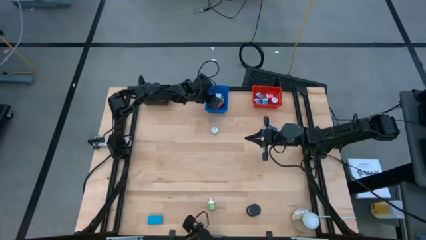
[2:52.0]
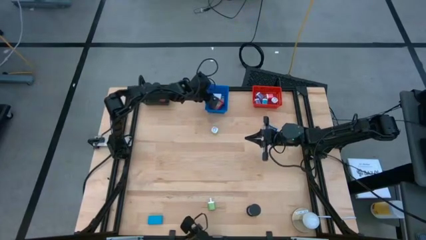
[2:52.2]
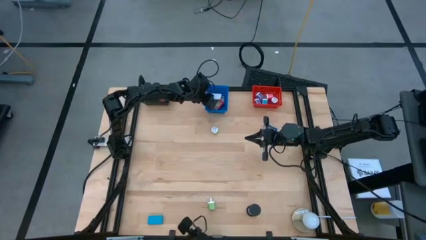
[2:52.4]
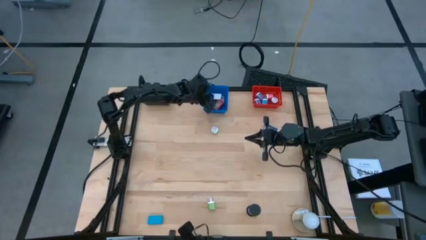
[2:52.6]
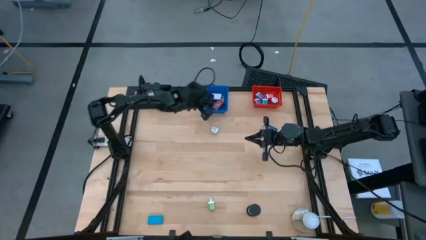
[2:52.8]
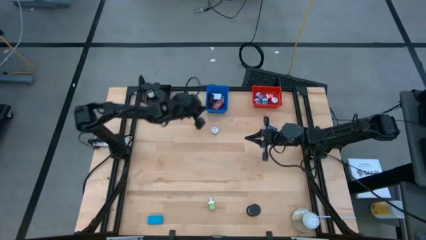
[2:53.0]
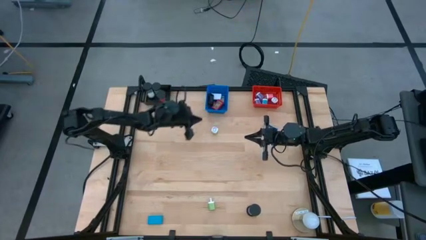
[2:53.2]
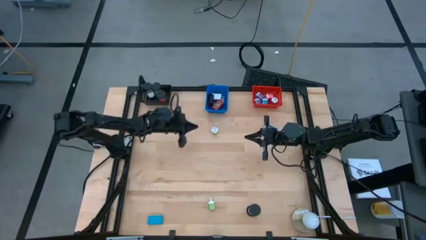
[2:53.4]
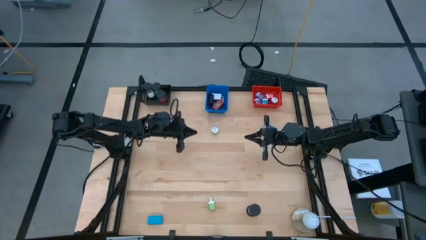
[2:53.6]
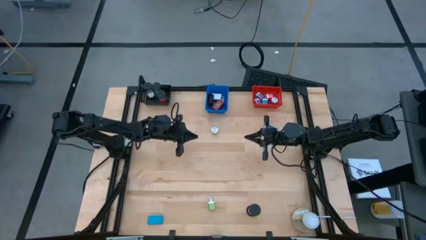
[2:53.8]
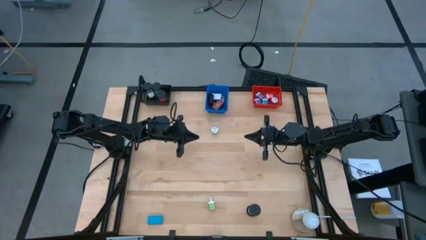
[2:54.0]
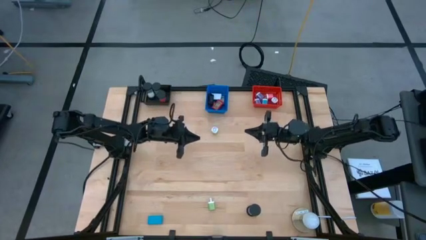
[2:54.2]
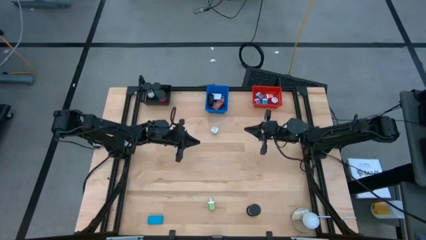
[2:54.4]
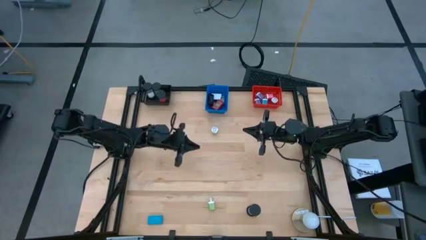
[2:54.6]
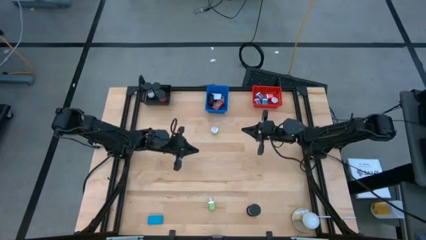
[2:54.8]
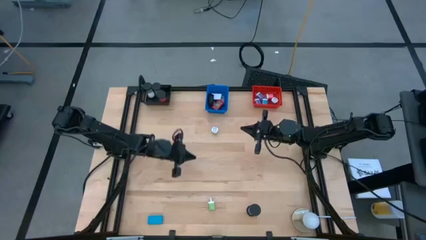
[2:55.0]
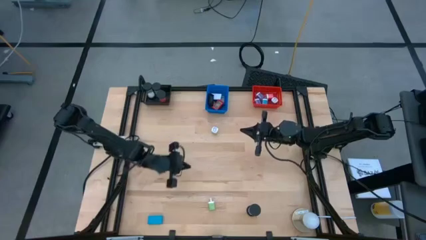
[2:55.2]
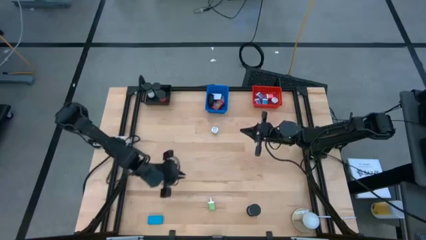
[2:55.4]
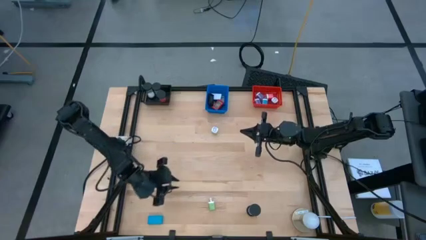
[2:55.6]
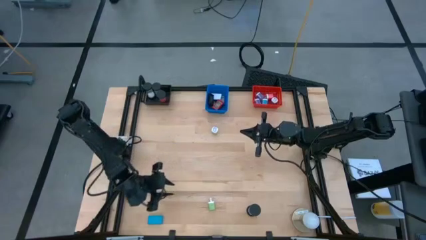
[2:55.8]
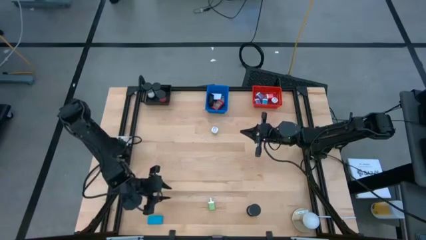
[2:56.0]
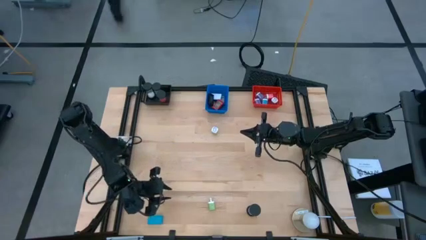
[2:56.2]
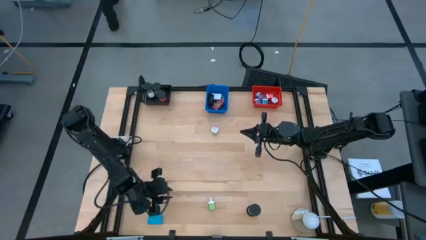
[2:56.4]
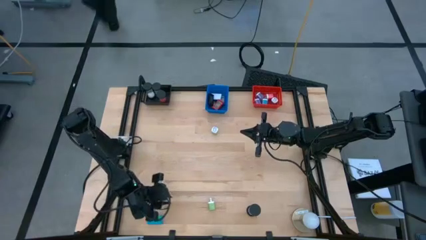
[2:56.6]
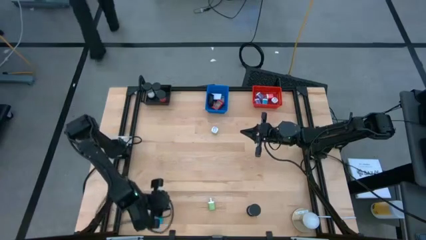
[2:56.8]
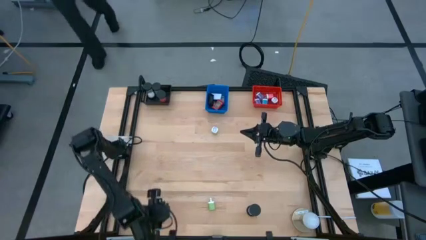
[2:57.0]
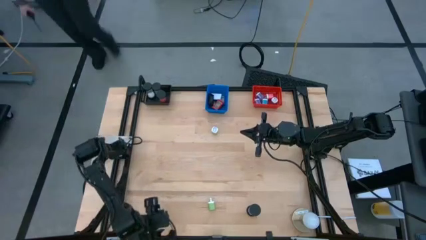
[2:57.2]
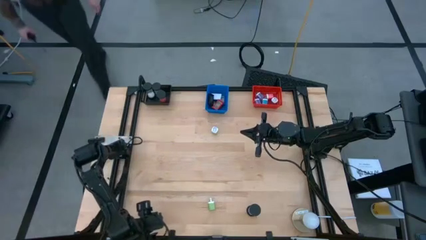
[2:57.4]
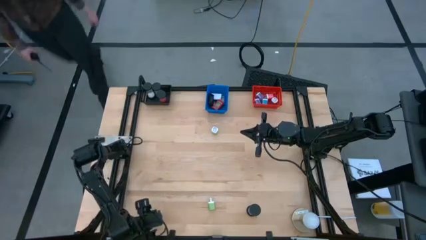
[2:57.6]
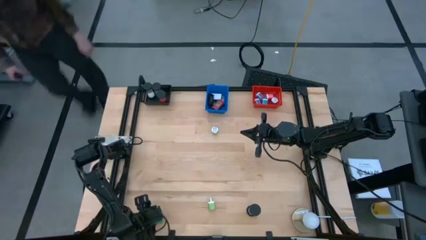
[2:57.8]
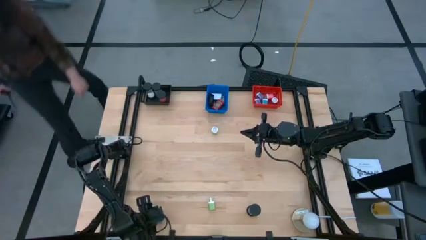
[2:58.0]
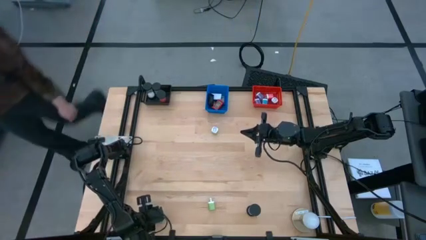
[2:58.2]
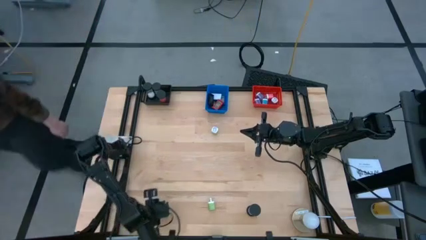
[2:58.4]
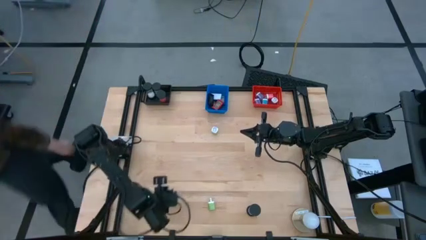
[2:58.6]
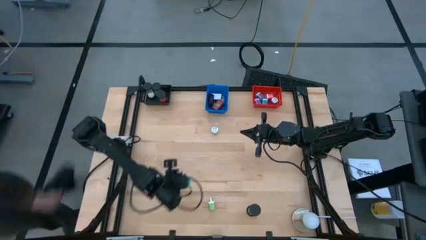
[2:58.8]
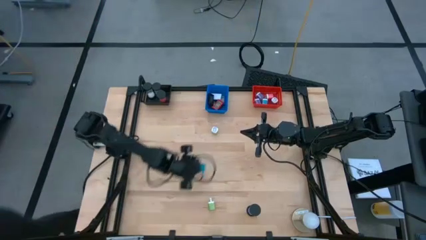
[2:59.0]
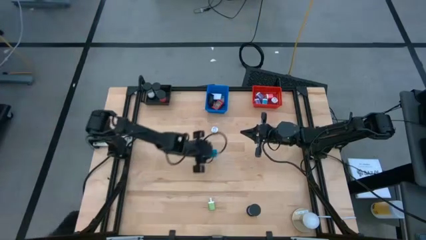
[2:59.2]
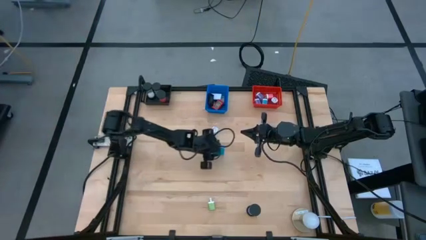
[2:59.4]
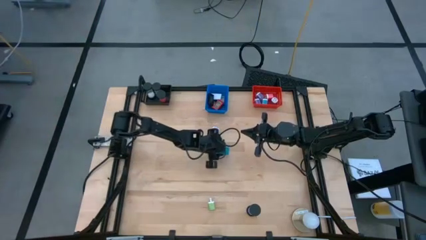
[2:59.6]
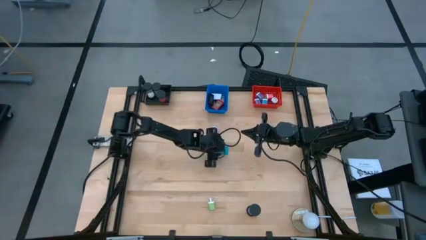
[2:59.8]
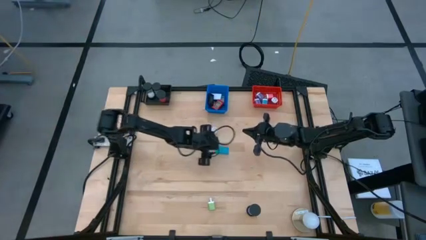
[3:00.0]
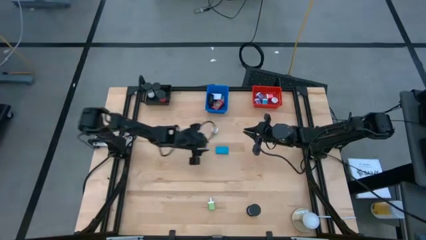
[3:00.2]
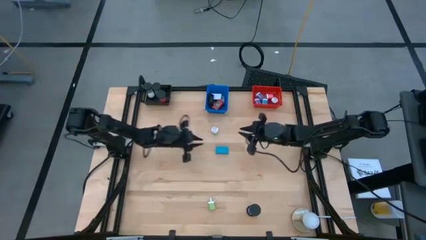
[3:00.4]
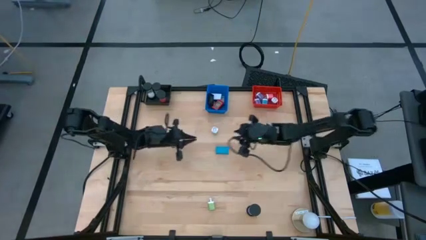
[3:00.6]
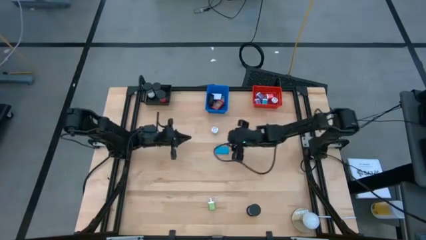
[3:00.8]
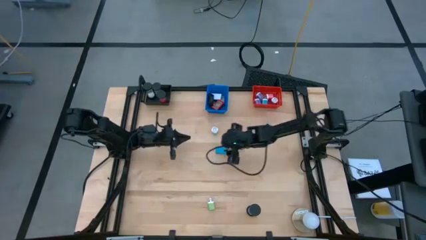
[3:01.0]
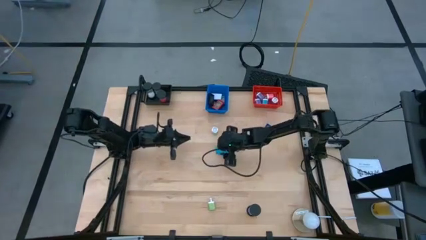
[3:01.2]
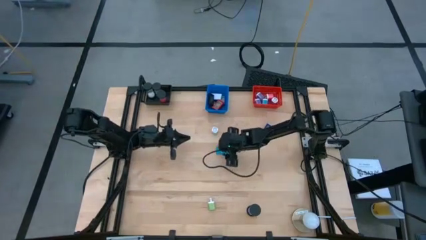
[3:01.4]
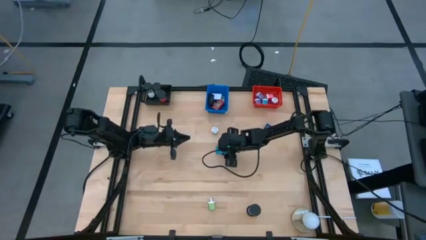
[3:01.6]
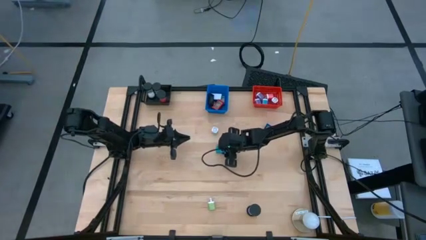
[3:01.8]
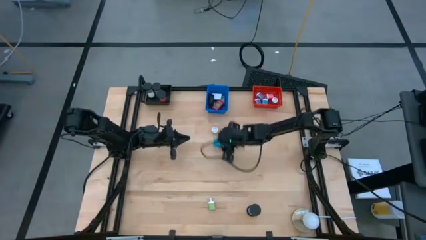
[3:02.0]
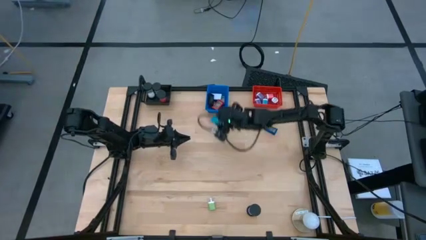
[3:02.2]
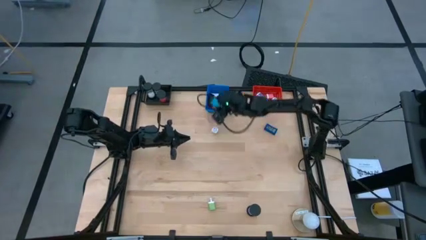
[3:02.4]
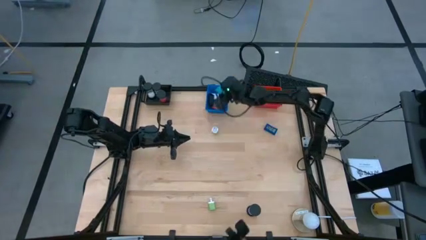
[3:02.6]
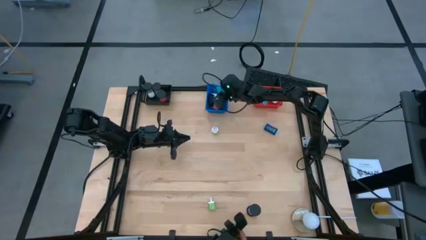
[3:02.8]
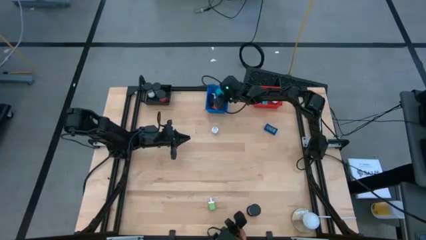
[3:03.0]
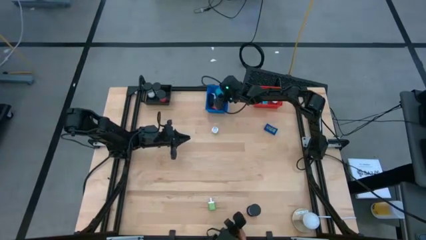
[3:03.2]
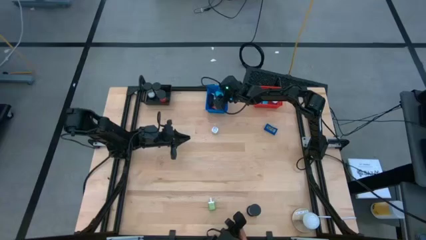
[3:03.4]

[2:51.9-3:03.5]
Task: Pick & Place Office items
Put the blue digital clock into the blue basket

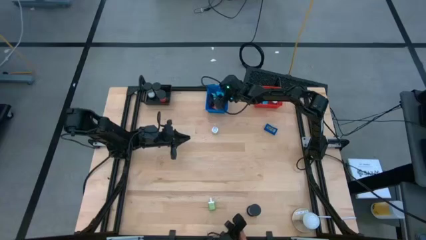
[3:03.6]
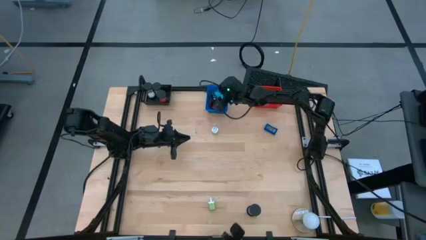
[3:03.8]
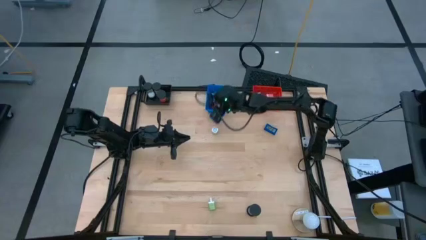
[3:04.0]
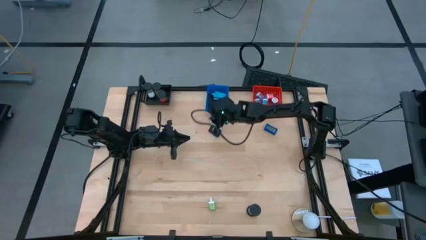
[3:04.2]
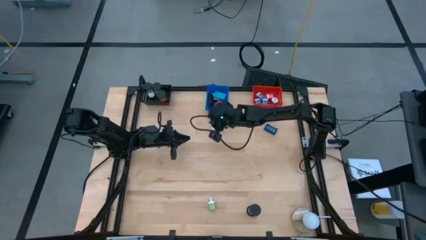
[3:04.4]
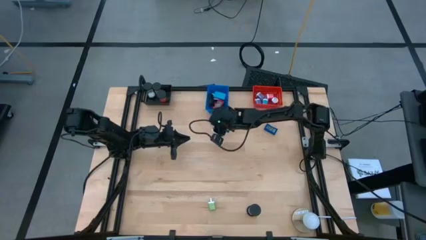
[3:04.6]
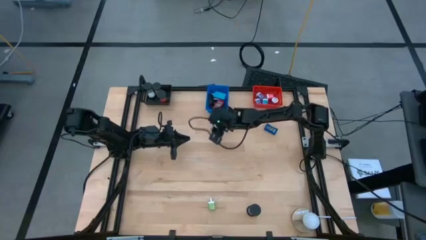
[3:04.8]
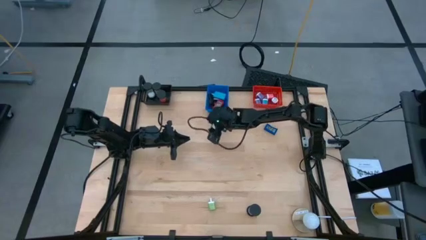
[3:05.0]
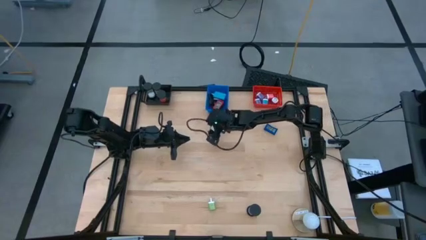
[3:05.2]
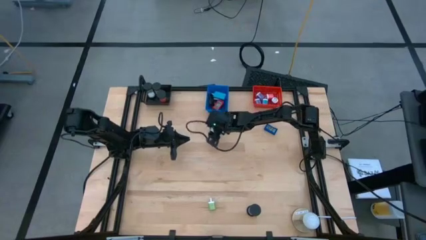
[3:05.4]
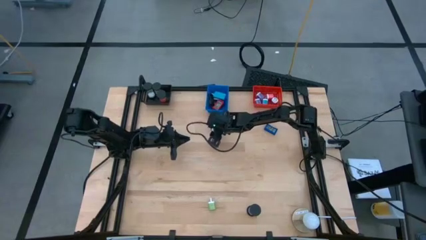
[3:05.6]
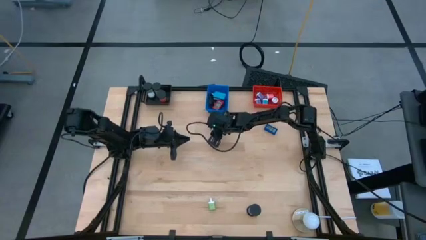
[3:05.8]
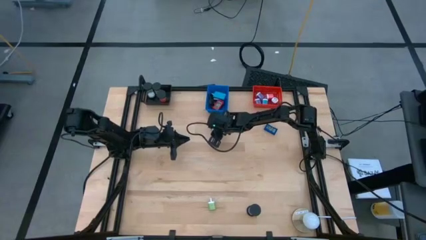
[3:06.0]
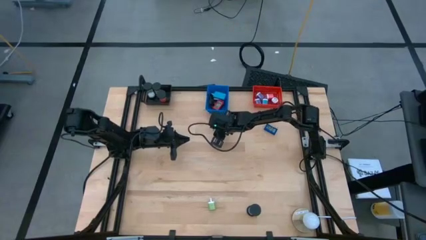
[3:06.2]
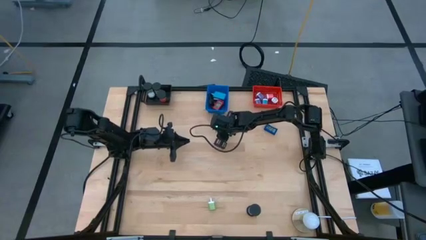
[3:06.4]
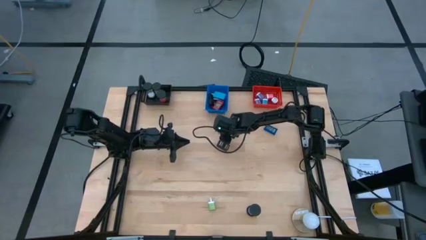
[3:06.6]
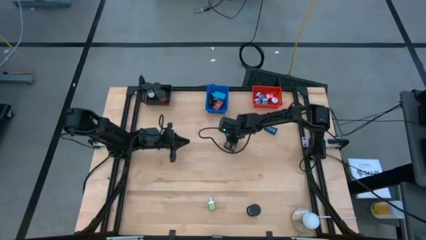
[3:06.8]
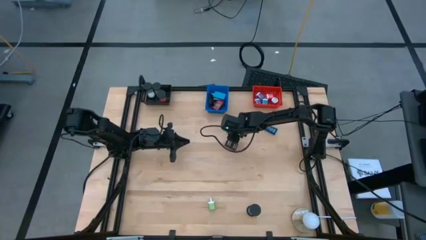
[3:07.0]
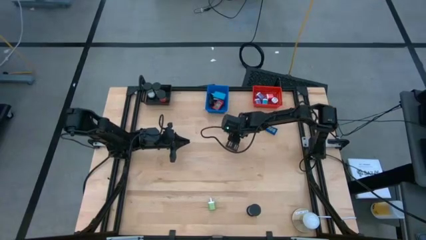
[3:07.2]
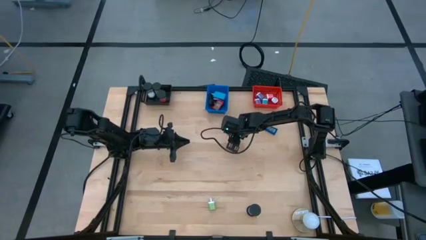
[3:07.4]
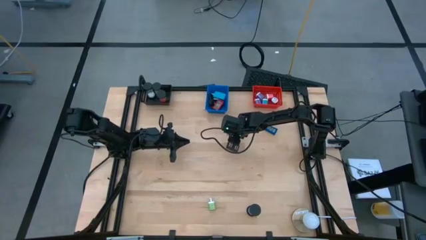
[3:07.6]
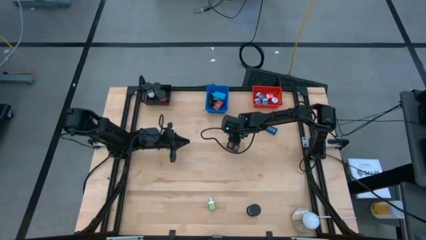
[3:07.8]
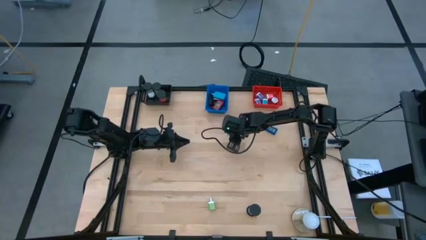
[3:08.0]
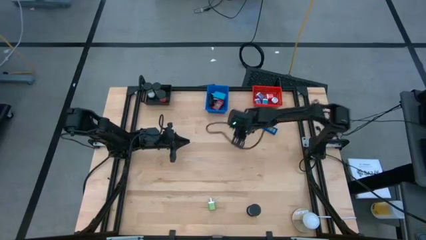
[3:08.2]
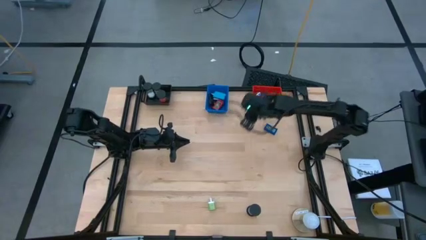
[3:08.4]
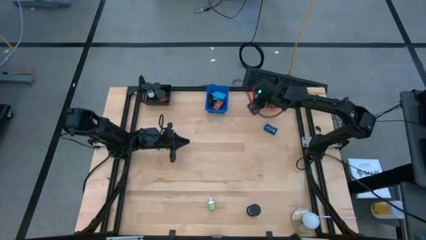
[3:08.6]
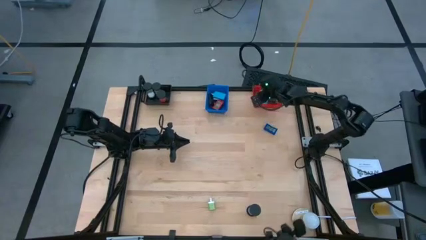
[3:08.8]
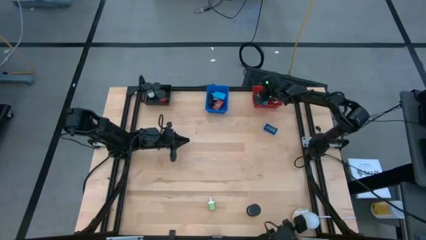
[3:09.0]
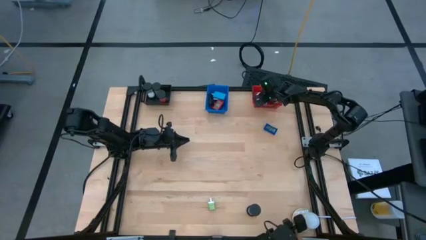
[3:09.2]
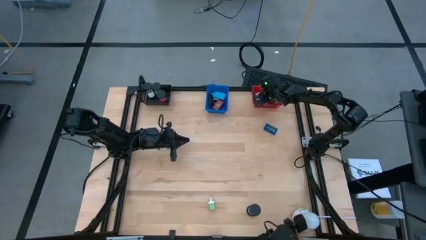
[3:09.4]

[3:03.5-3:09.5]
Put the top green charger adapter into the red basket
